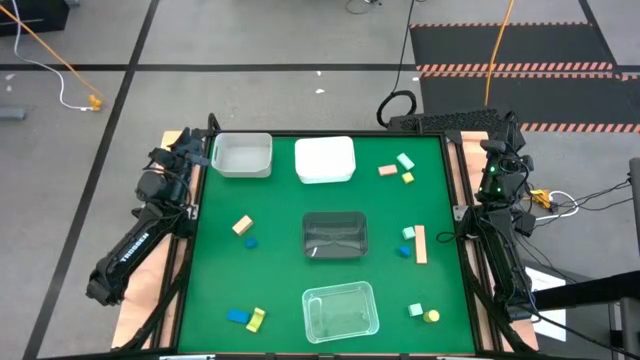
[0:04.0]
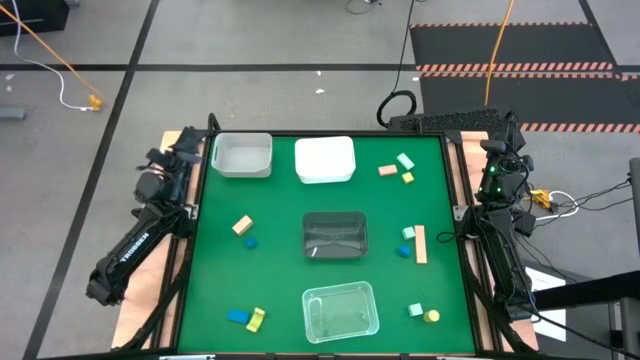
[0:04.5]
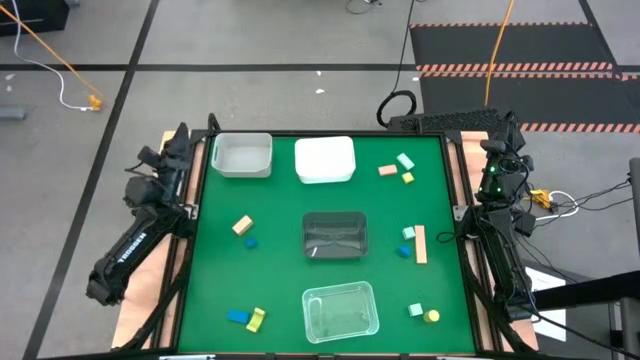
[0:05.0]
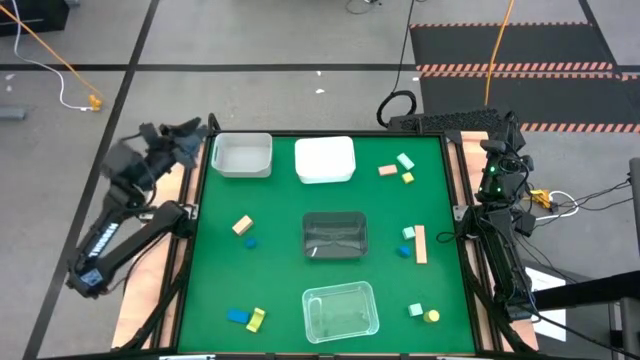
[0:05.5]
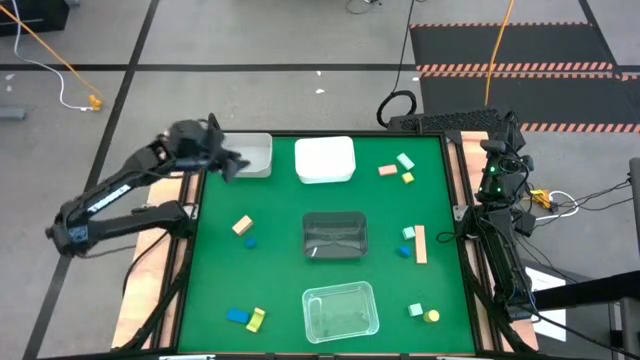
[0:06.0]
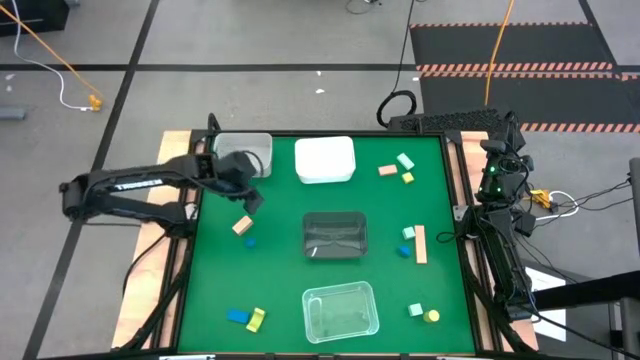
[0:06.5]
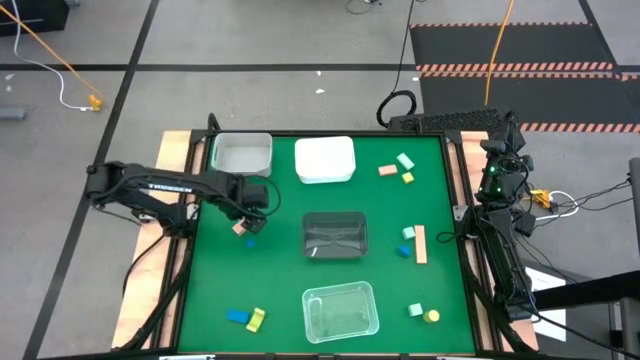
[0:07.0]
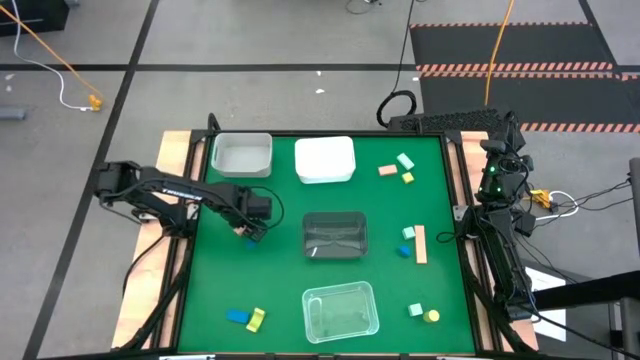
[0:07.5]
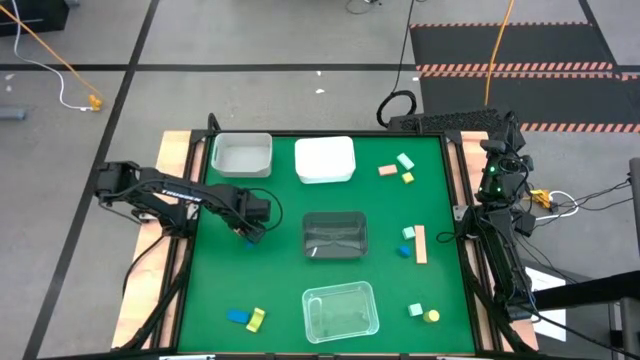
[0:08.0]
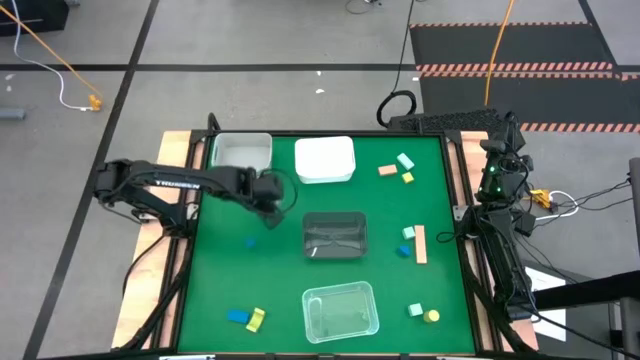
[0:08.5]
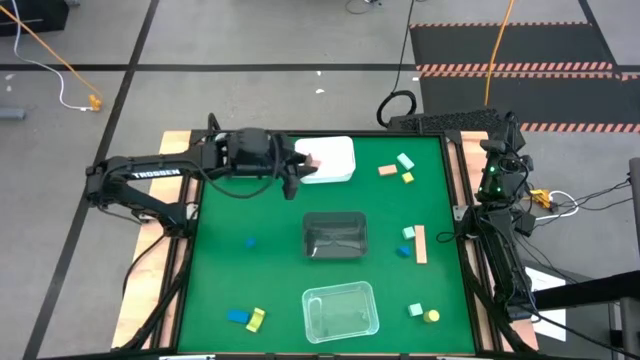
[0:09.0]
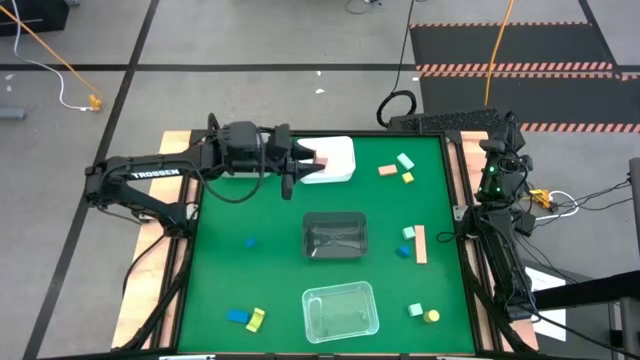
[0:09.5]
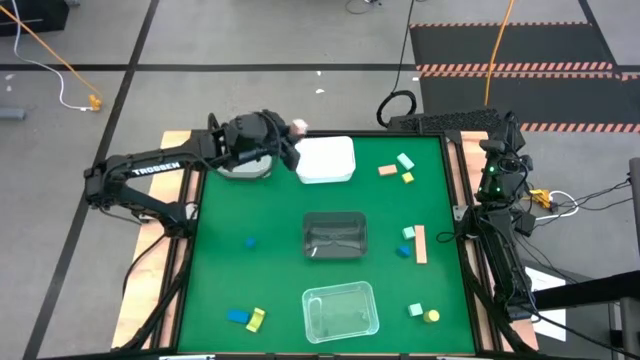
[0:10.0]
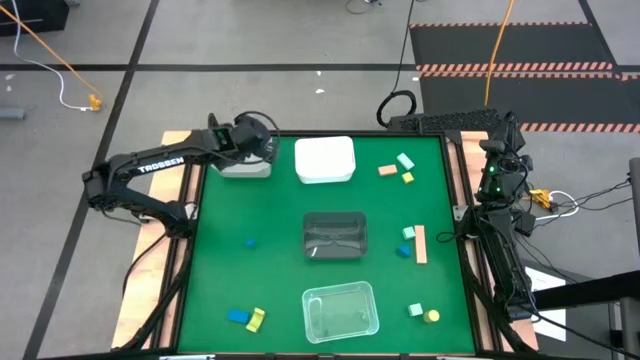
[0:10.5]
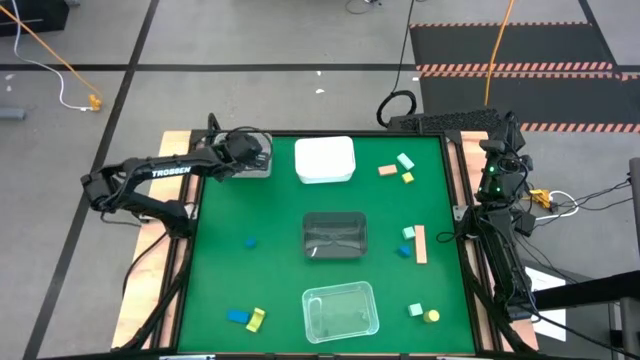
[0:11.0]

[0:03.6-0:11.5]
Task: Sort & place blocks by color
Put the left brown block into the gray bin

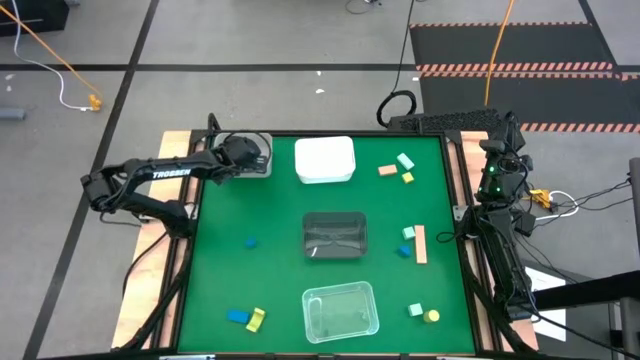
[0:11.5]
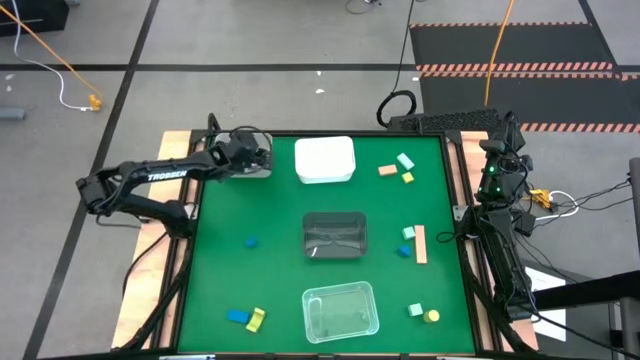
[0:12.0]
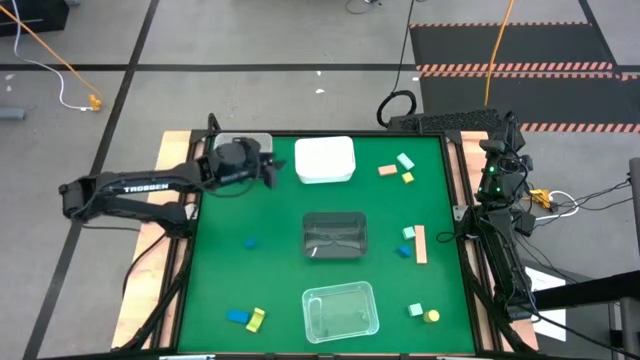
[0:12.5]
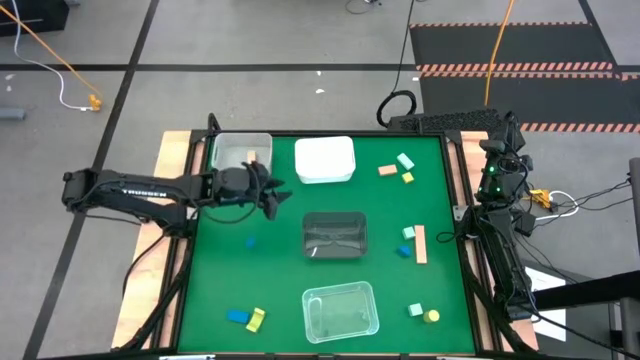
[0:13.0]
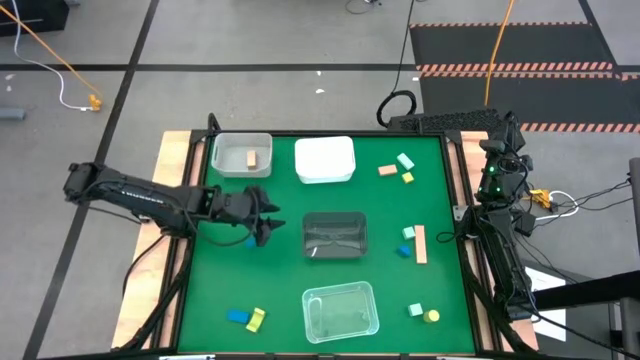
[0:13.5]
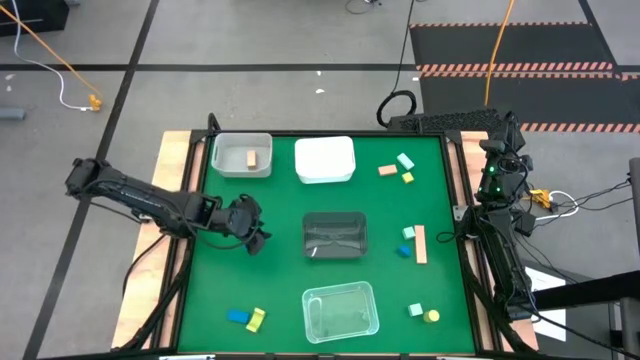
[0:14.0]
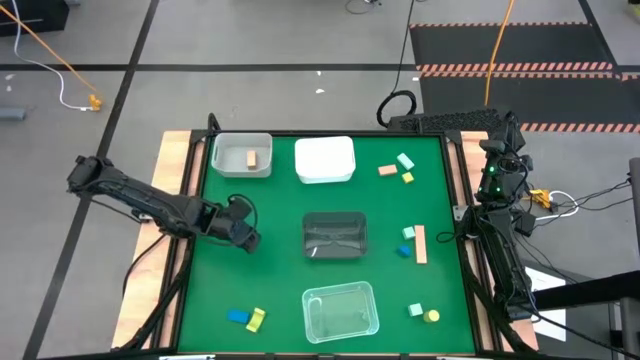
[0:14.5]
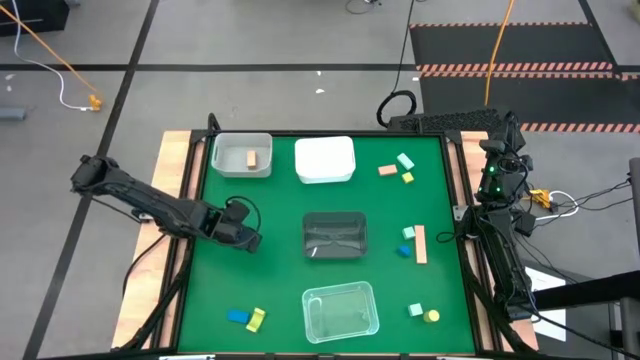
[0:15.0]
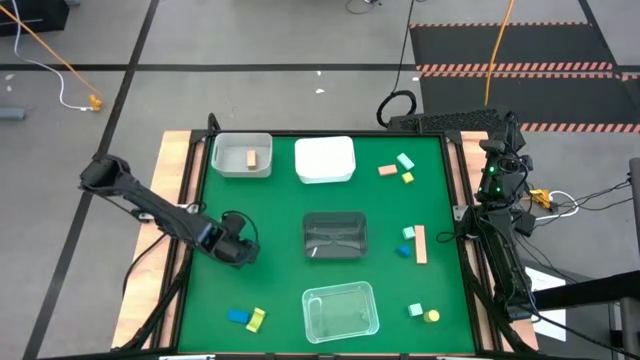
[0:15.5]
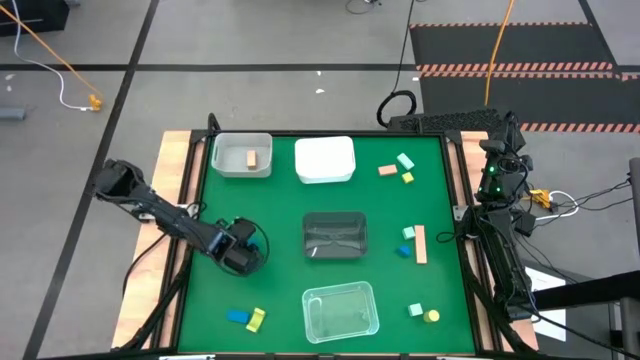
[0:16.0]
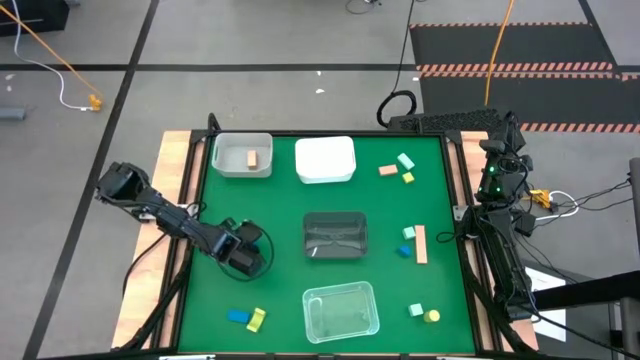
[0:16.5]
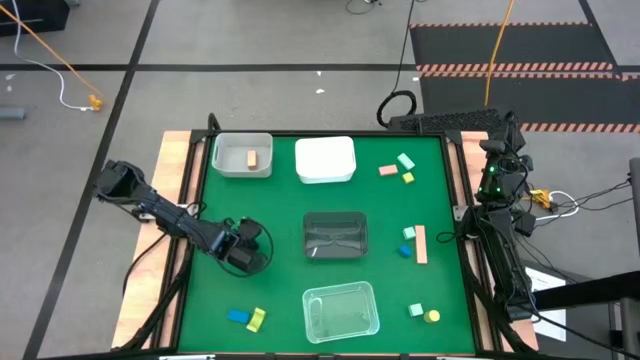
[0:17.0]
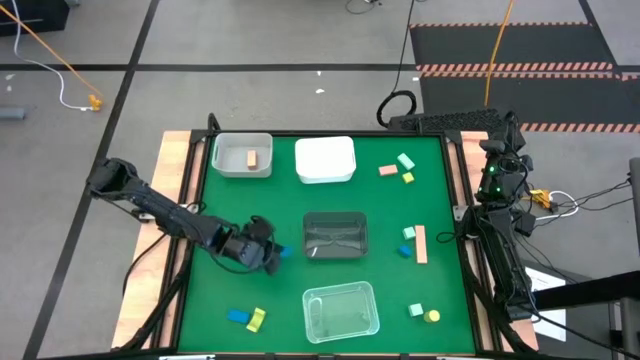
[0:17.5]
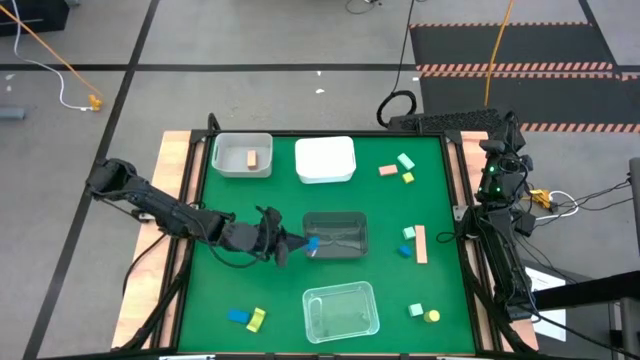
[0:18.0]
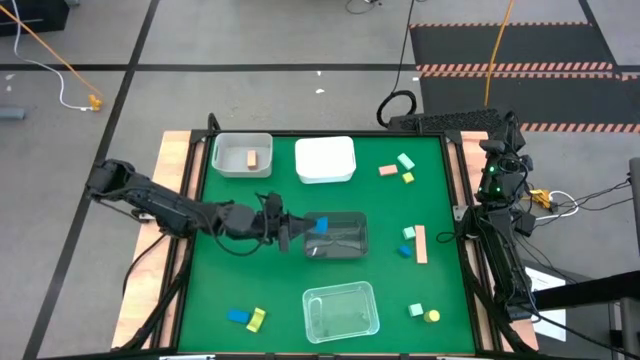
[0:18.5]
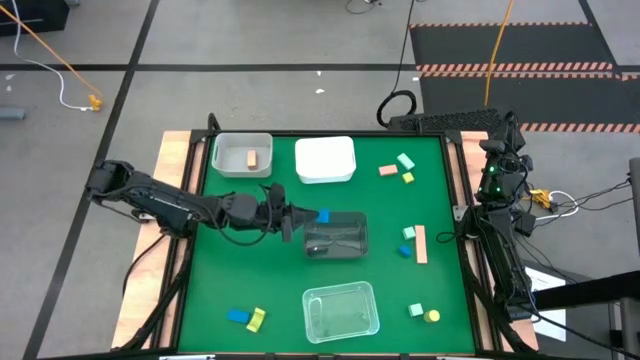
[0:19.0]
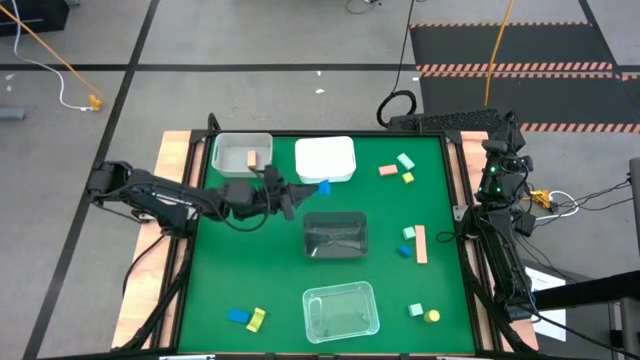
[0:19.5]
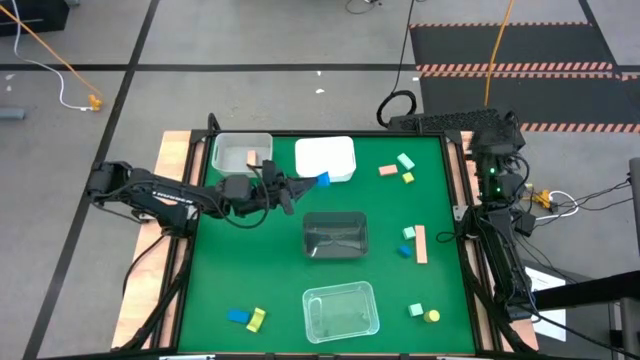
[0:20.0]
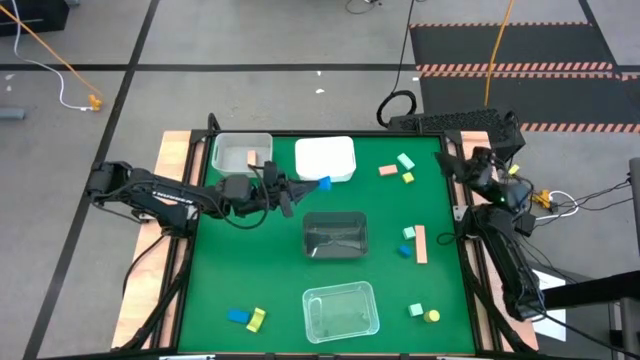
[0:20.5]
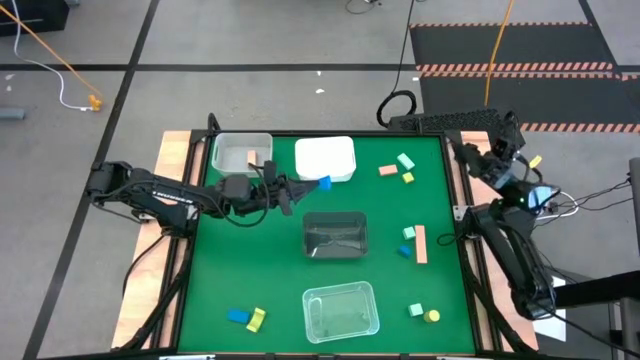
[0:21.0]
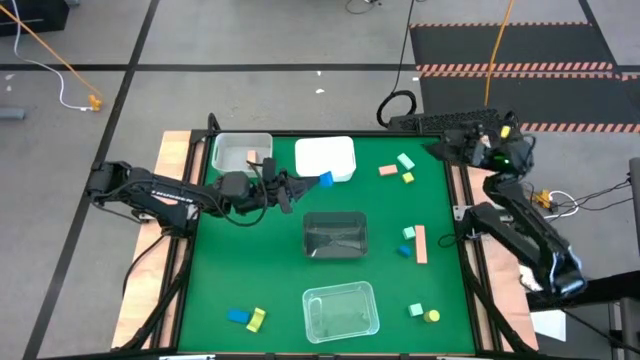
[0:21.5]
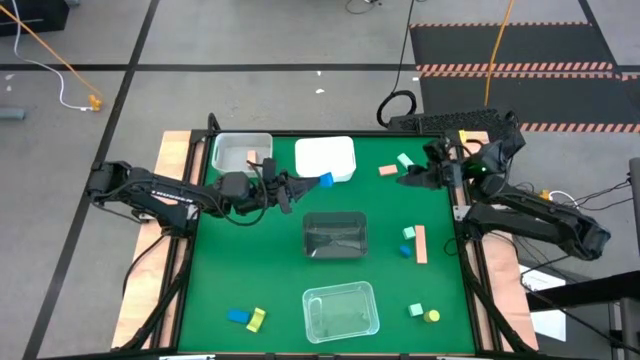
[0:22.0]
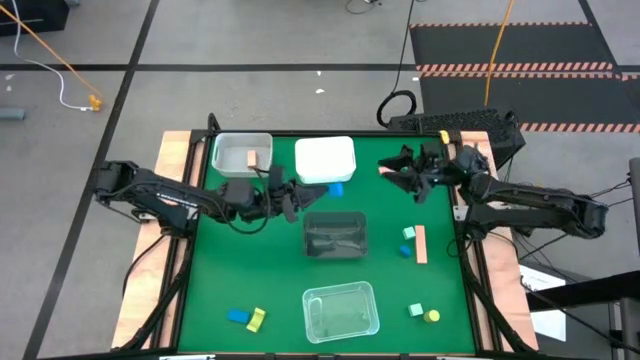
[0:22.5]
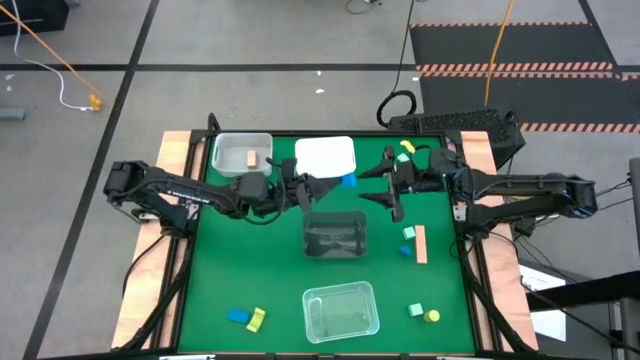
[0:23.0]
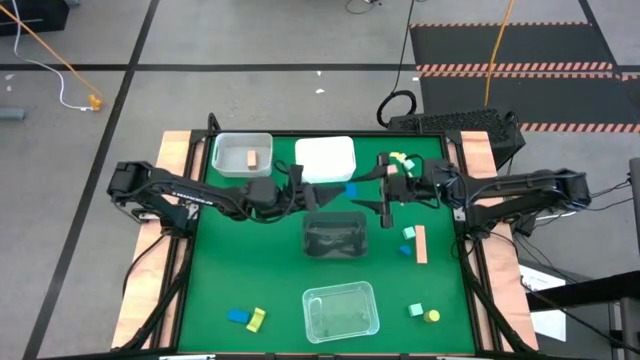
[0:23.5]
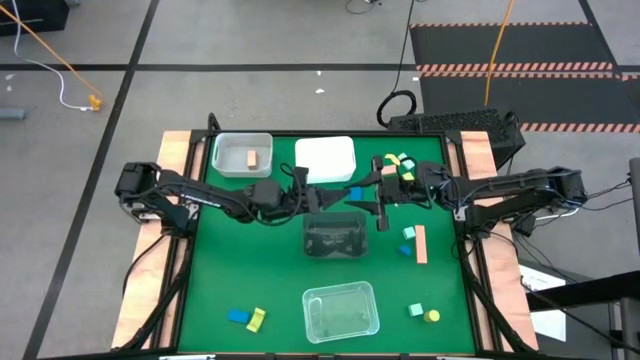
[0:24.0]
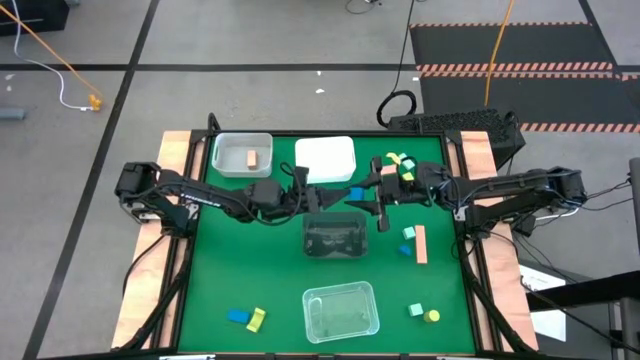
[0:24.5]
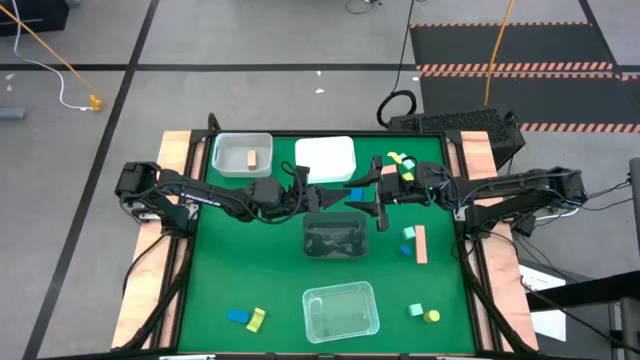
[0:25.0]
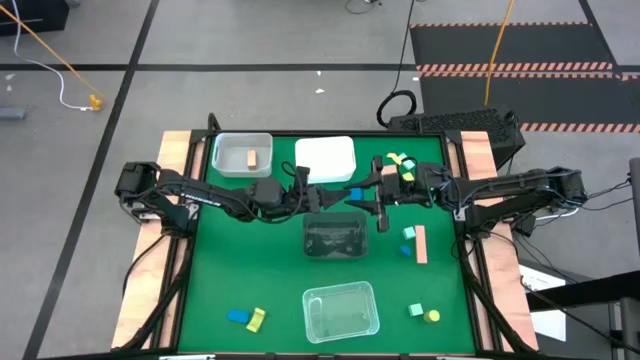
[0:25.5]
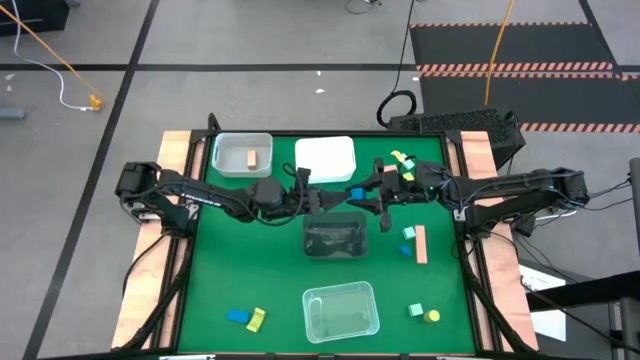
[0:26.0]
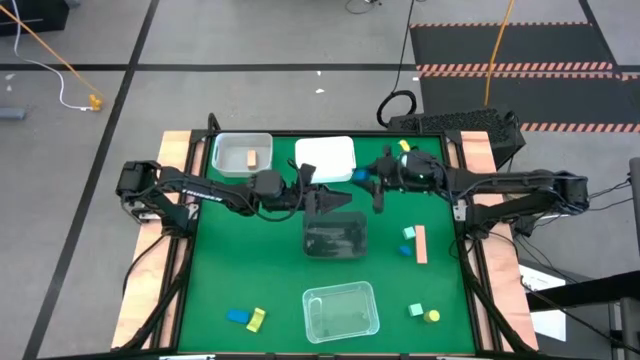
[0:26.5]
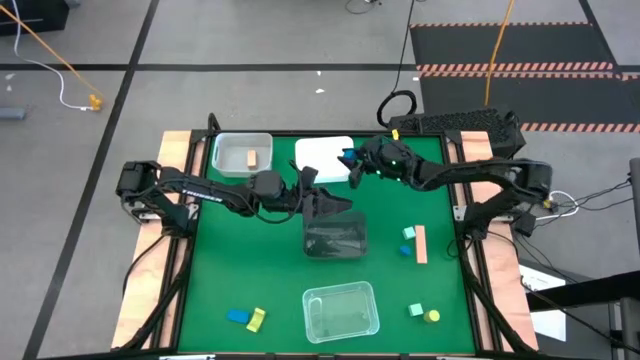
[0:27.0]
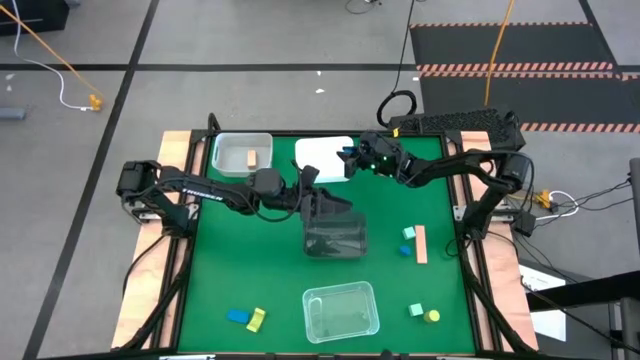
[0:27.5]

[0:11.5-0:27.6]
Put the top left blue block into the white bin
